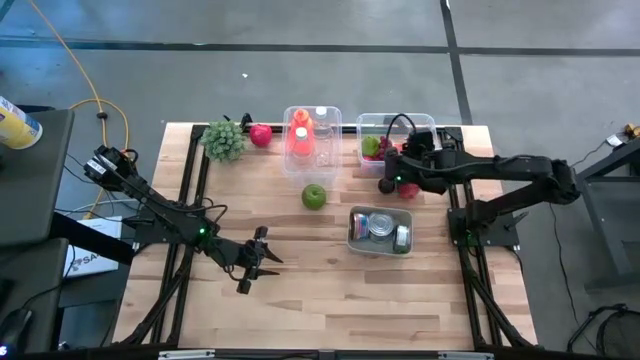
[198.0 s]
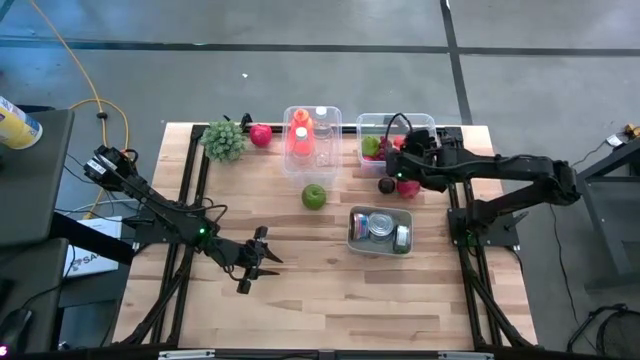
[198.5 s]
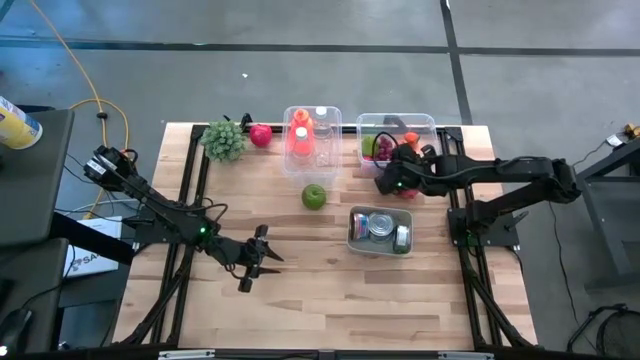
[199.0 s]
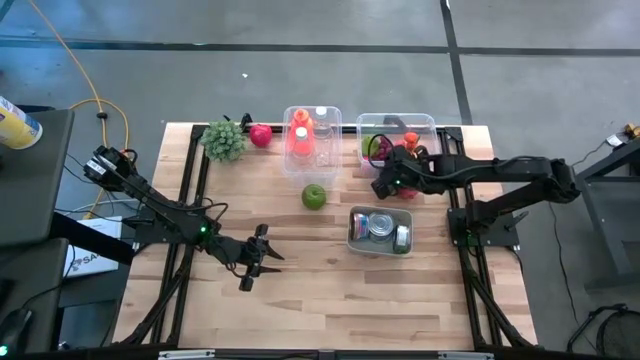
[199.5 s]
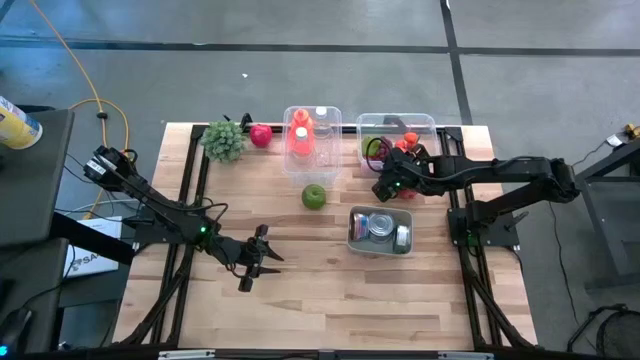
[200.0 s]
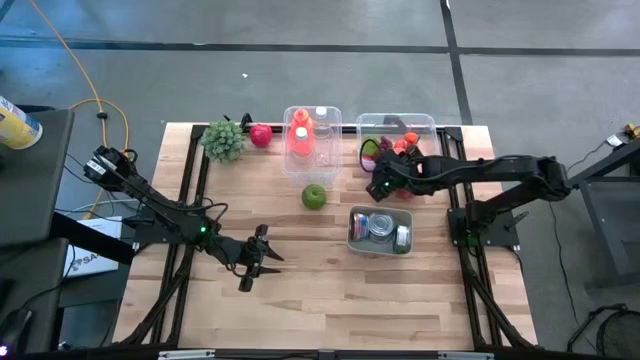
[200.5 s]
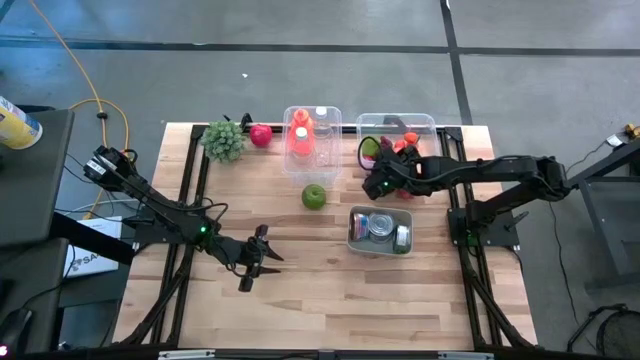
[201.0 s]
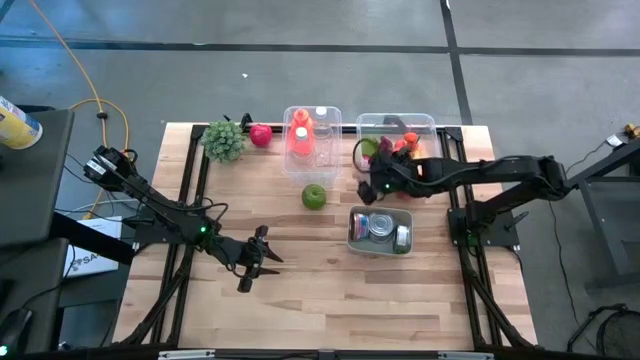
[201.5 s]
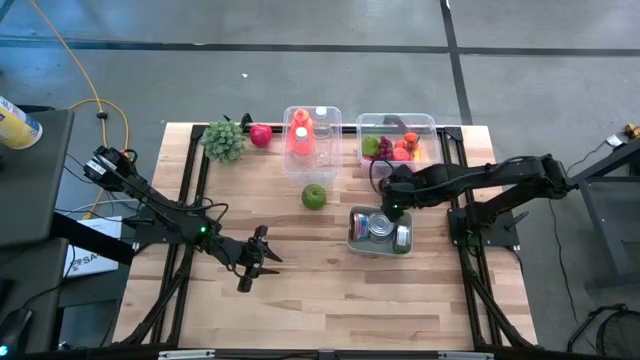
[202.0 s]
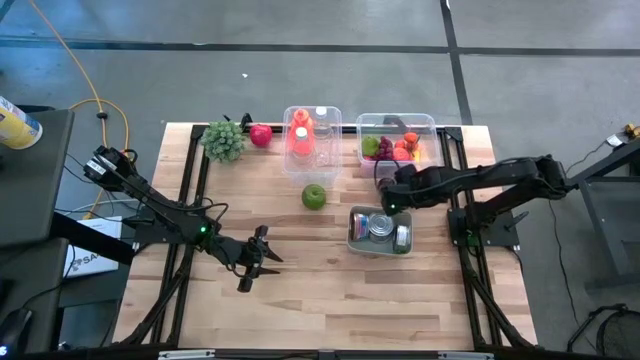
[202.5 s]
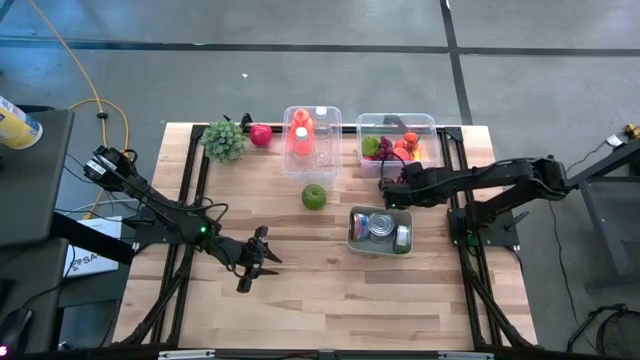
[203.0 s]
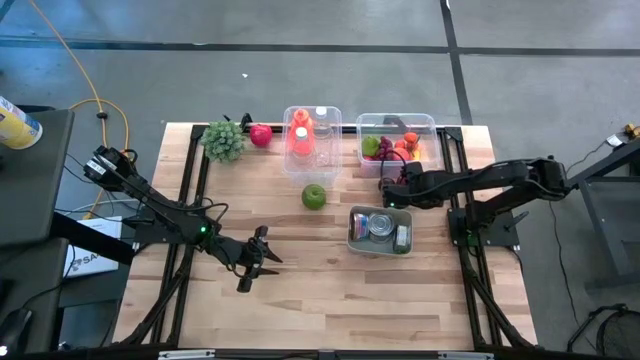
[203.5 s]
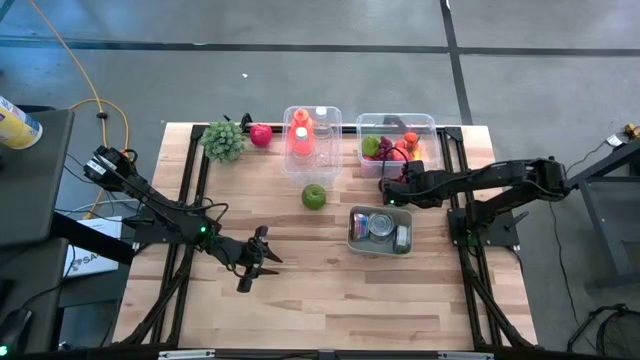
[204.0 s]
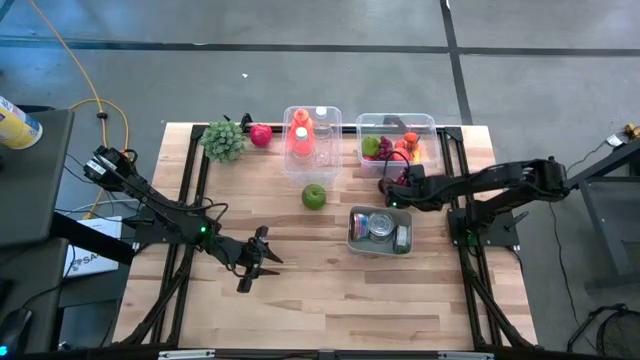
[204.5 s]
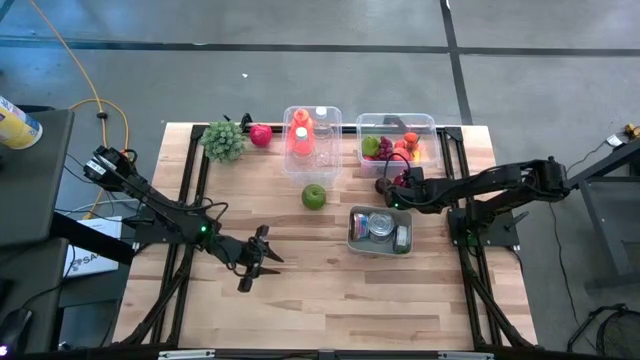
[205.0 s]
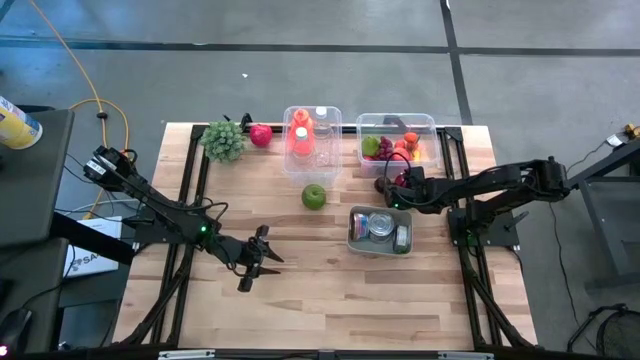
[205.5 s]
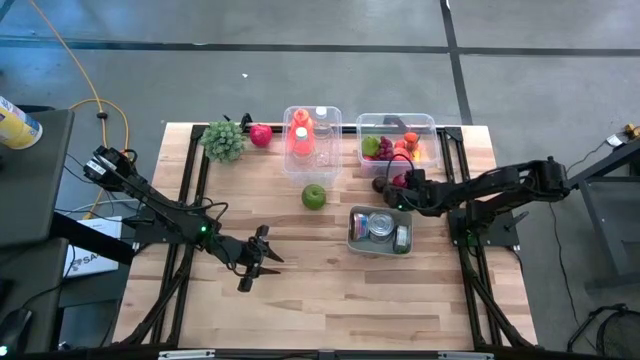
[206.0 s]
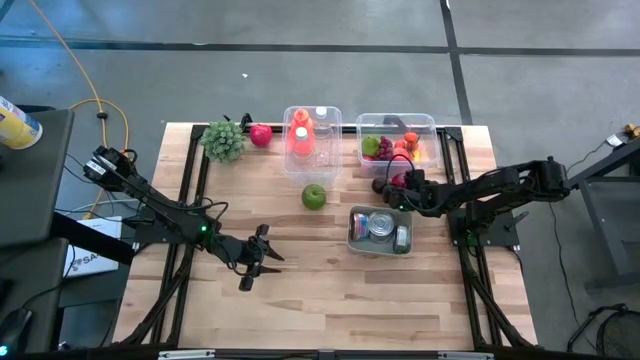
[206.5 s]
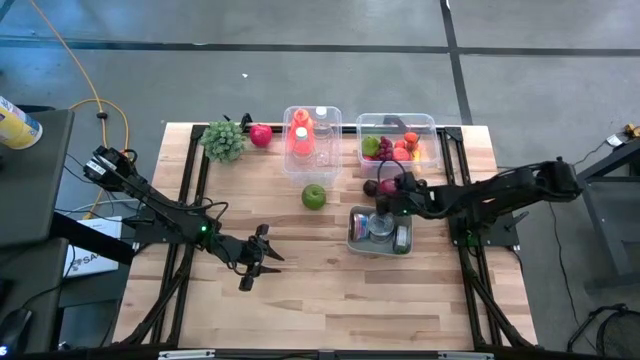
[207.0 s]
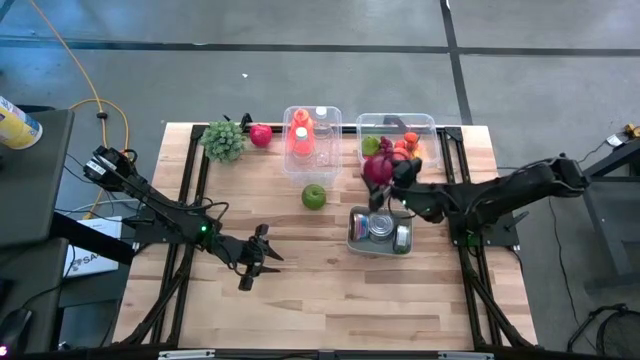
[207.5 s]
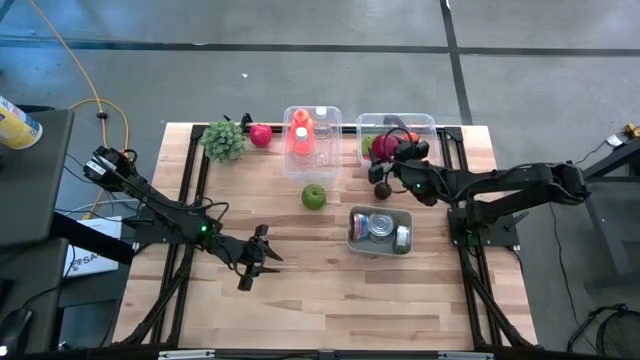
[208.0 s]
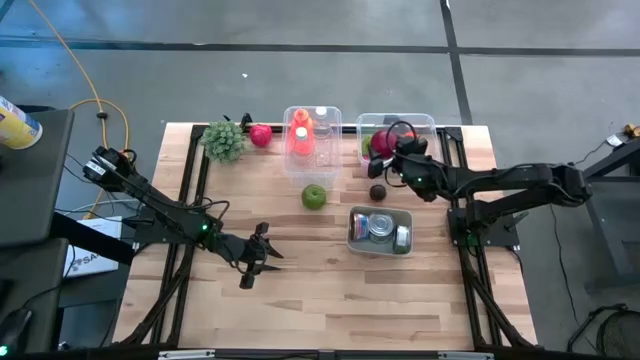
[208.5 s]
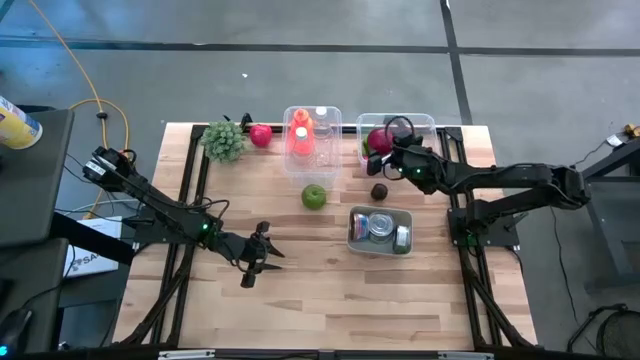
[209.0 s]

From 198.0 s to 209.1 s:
Task: Pick & Place Food Item
Put the pomegranate into the right transparent bin

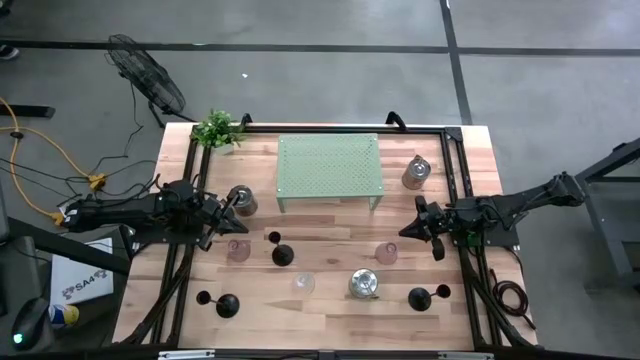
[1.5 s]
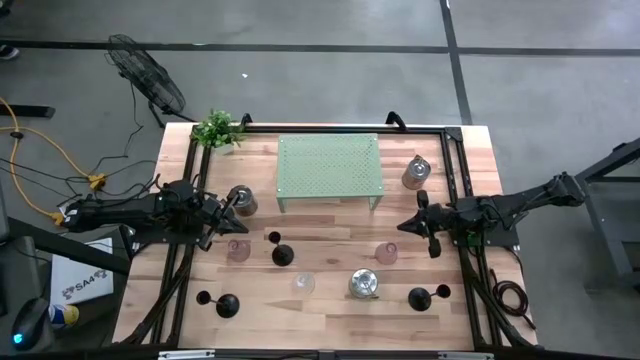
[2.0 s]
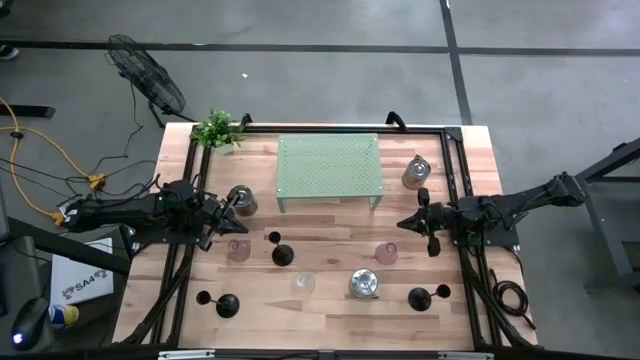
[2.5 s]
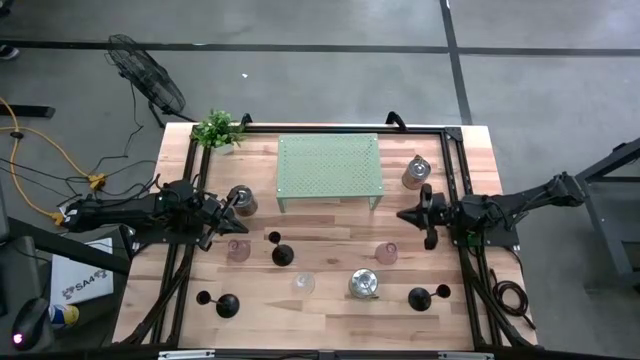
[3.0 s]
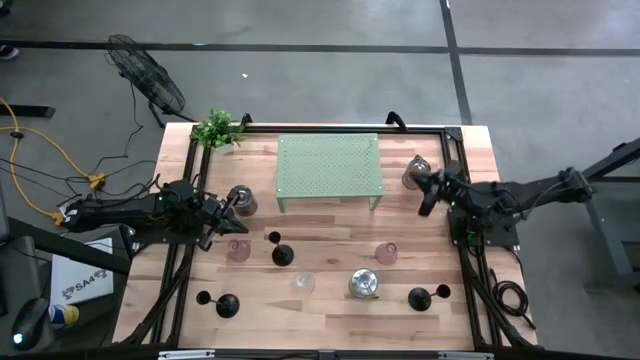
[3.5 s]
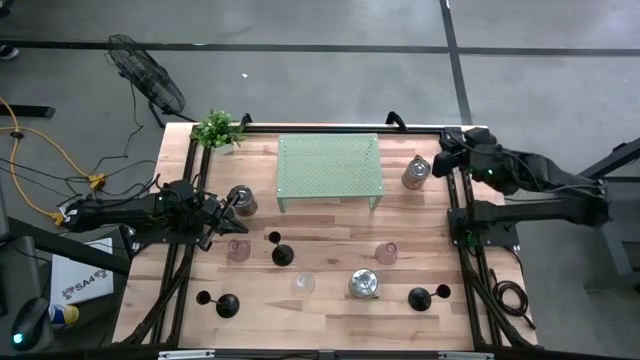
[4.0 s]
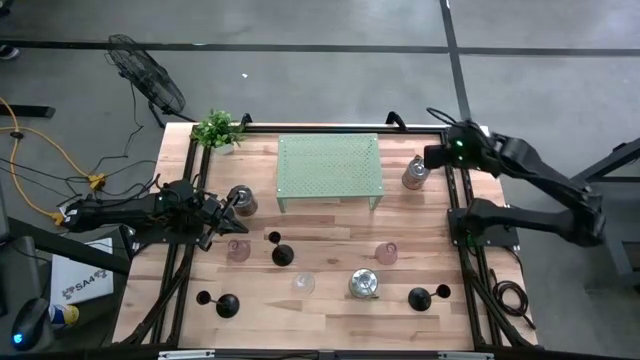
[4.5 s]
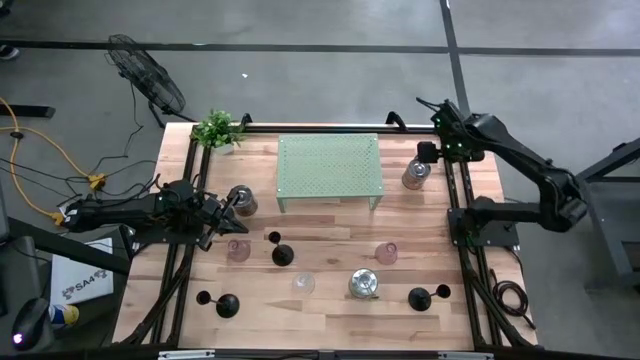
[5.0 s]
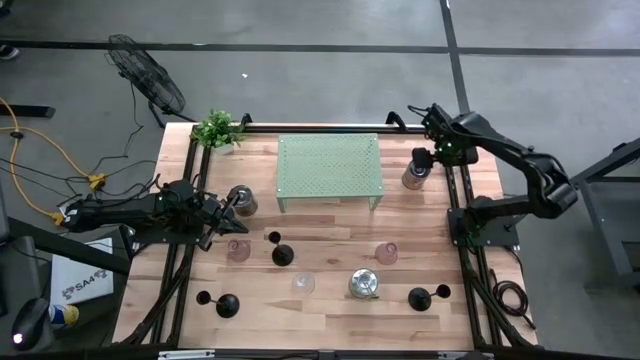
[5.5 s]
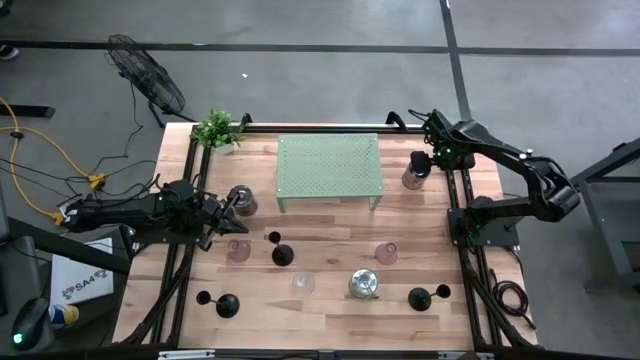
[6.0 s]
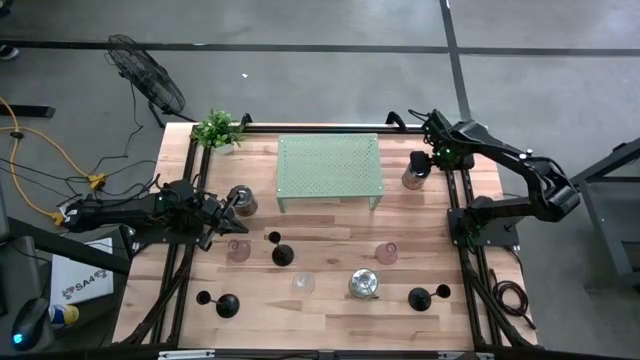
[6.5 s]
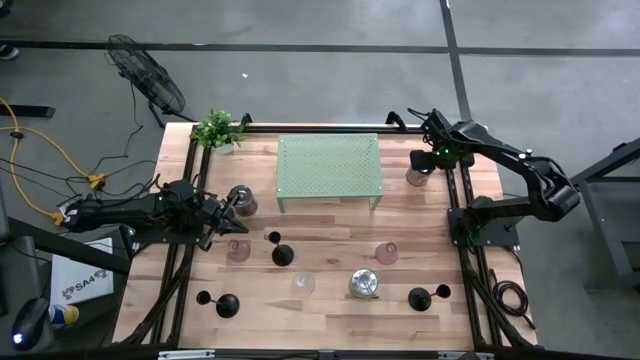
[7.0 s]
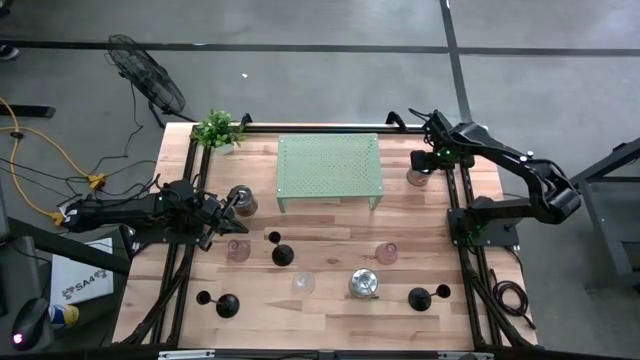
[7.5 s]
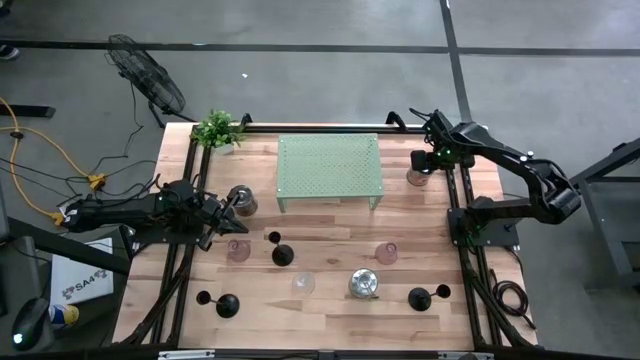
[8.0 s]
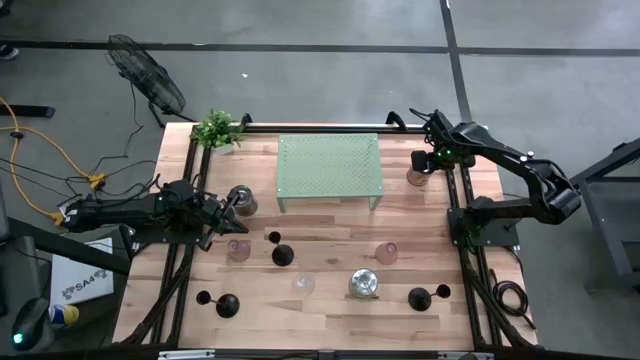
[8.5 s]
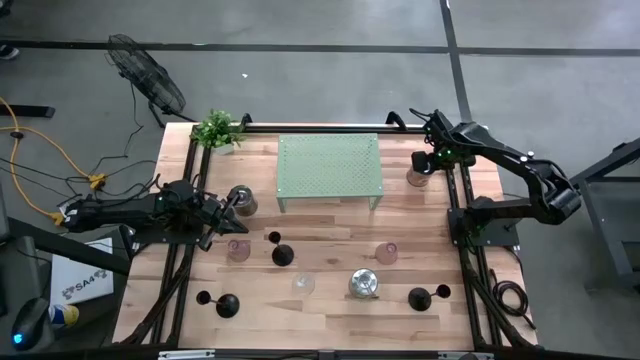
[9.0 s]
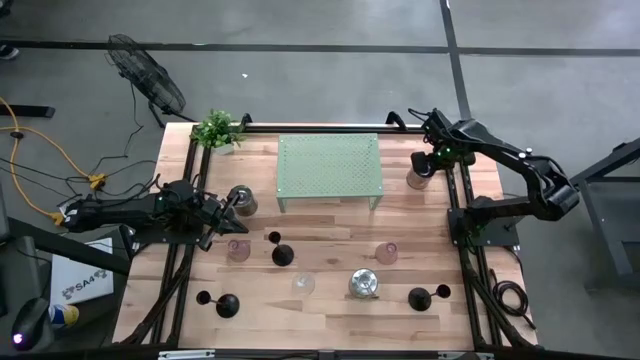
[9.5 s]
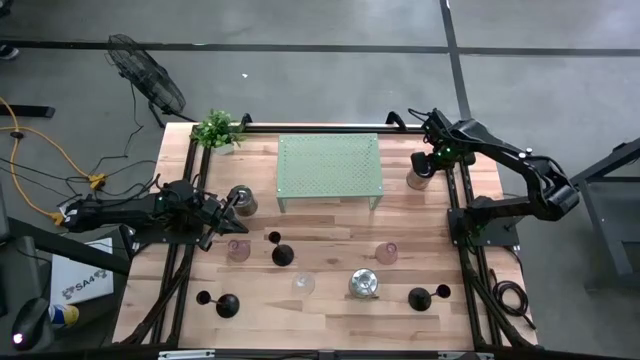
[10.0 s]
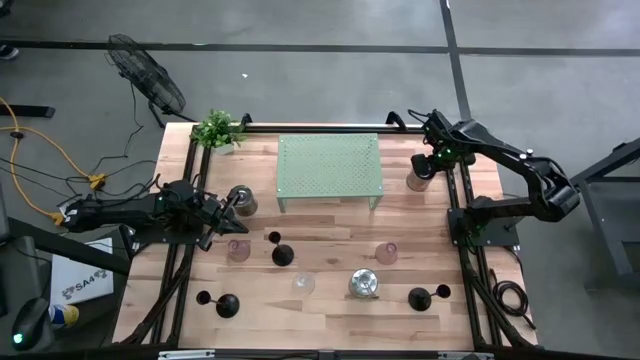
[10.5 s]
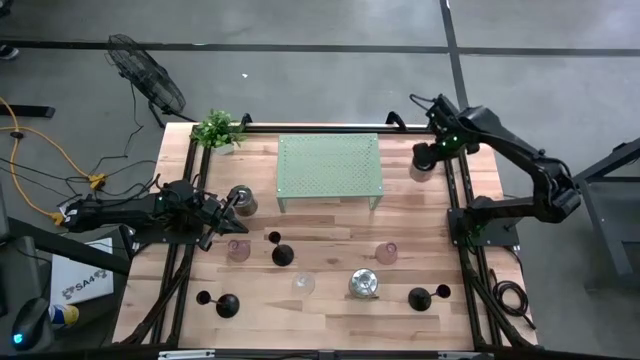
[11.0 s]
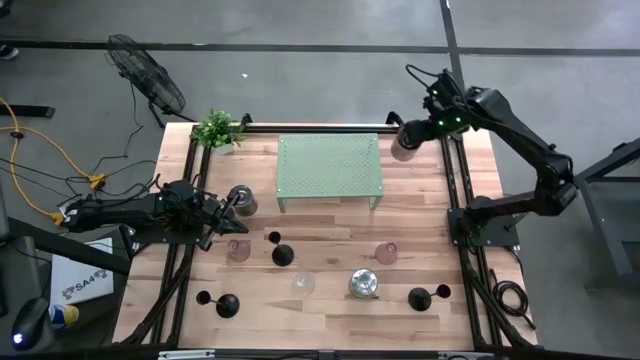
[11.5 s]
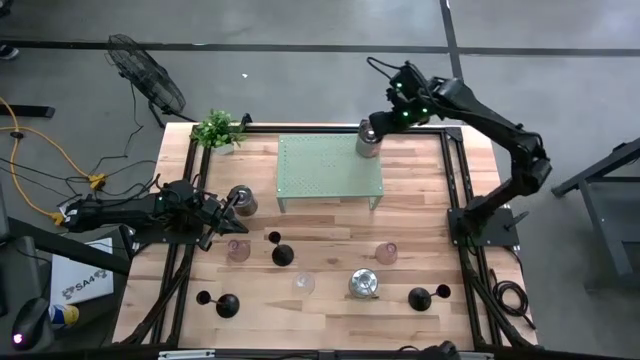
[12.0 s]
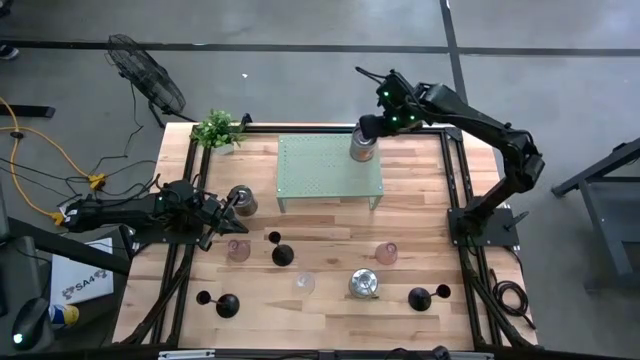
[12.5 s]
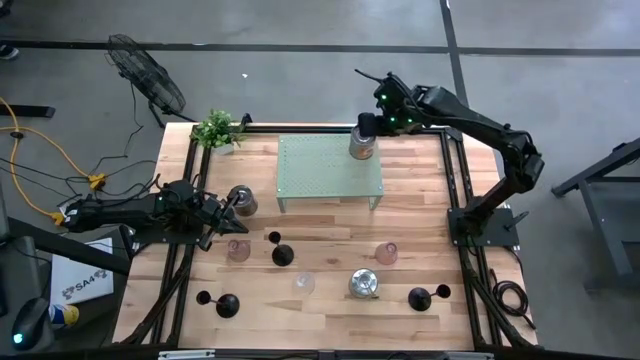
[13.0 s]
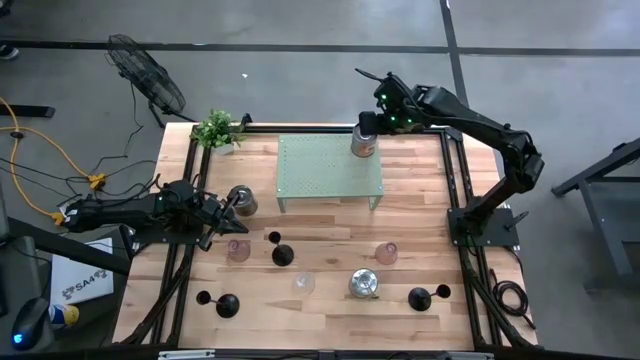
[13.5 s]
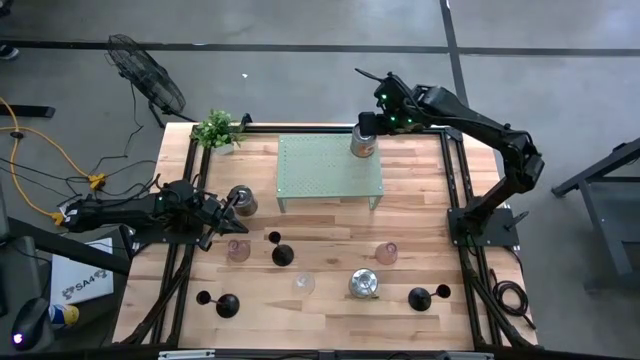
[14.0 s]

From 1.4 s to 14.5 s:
Task: Pick & Place candle stick holders
Put the top right silver scented candle on the shelf
